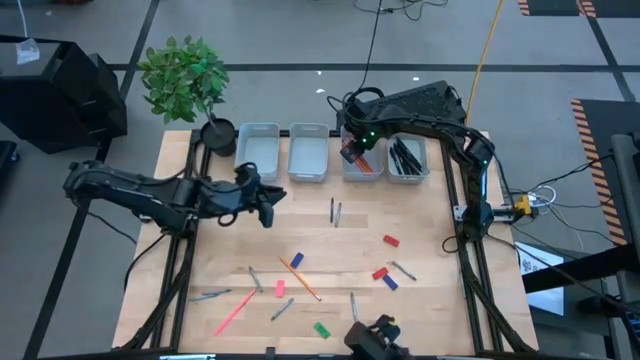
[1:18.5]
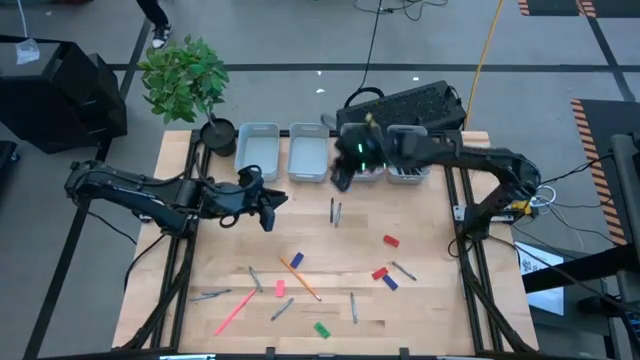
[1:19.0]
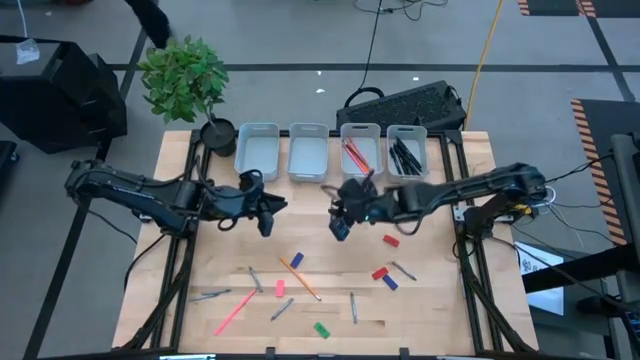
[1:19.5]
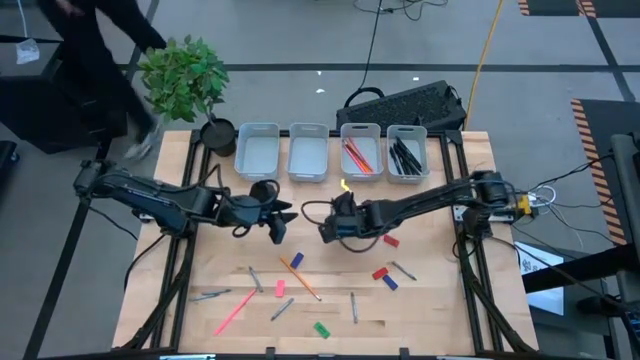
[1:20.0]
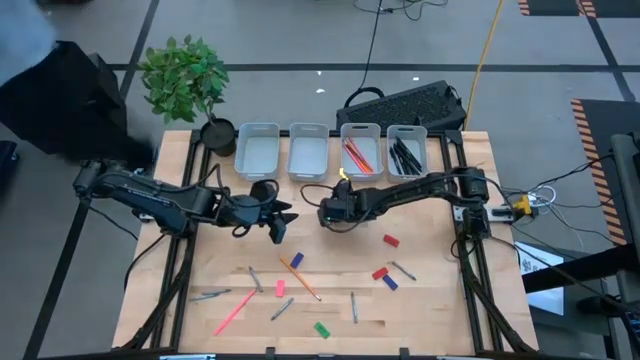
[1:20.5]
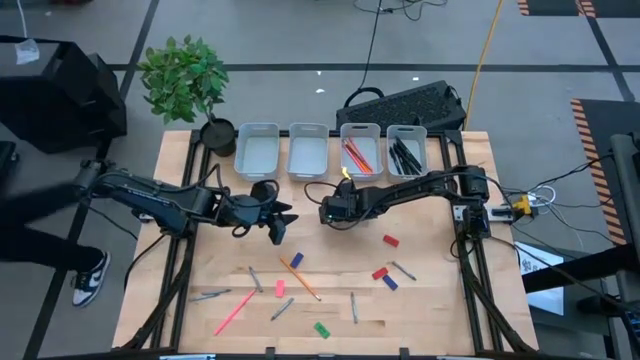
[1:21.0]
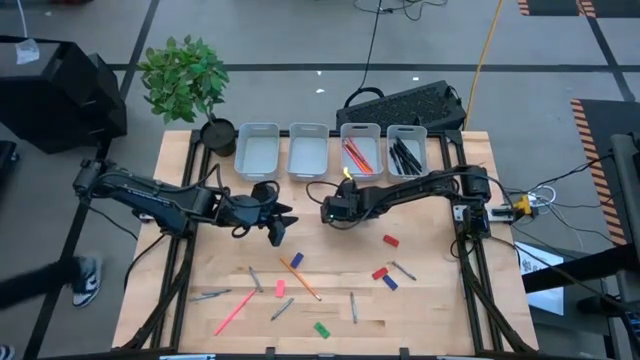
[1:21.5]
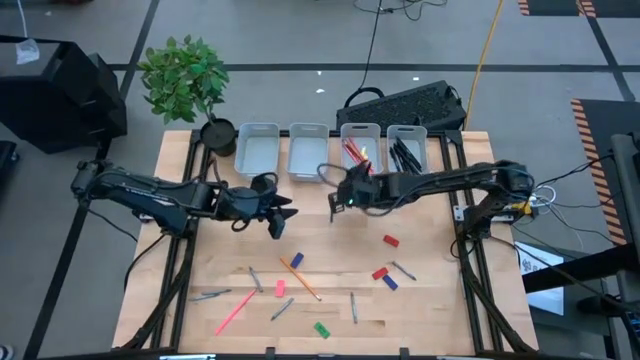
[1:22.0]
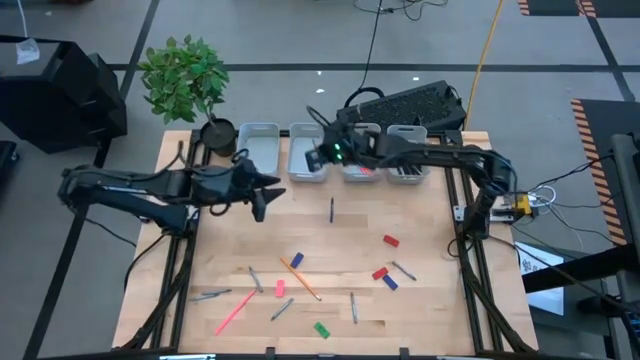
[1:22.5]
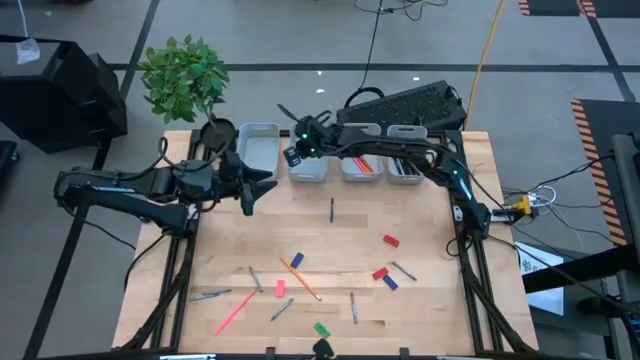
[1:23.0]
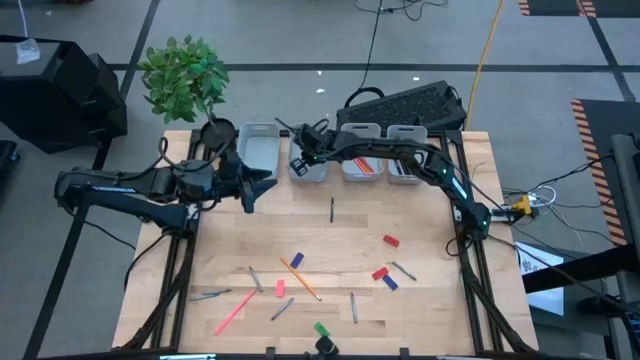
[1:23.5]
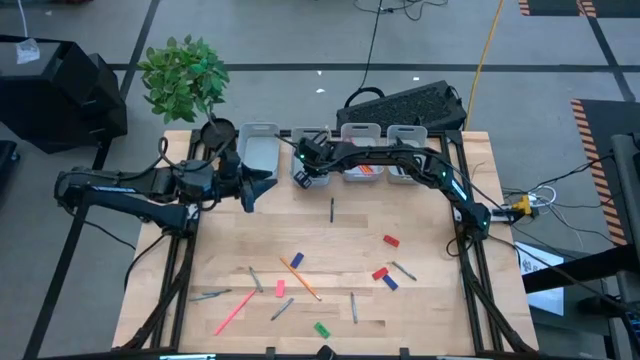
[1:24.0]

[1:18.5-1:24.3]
Task: Sort crayons/erasers/pens/pencils in bins
Put the gray crayon into the middle left gray bin

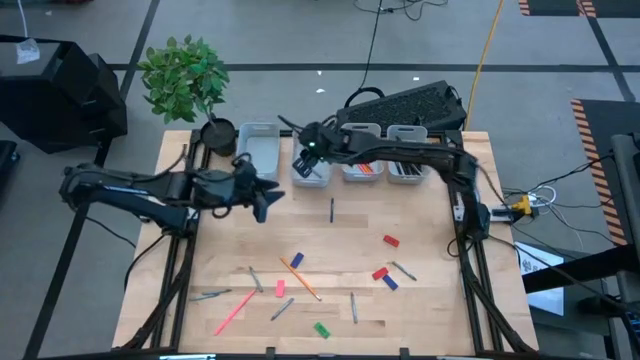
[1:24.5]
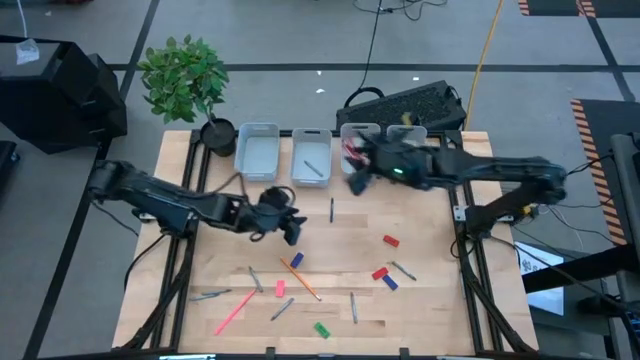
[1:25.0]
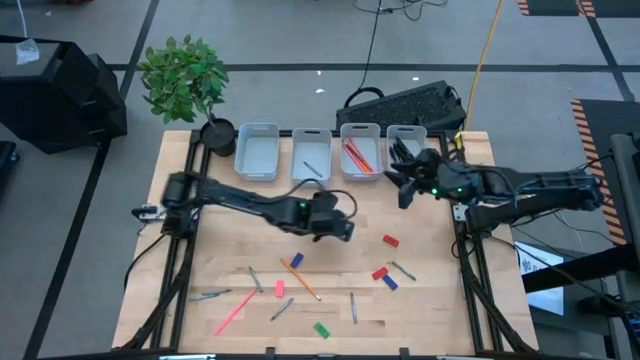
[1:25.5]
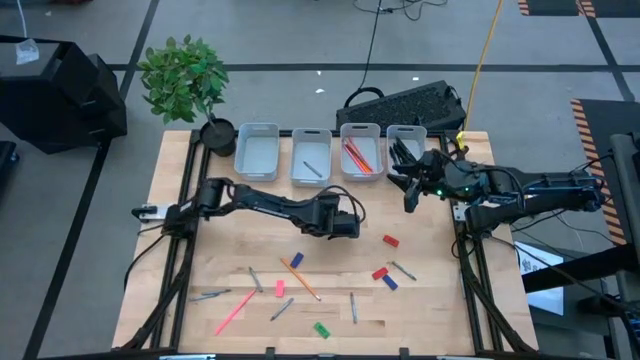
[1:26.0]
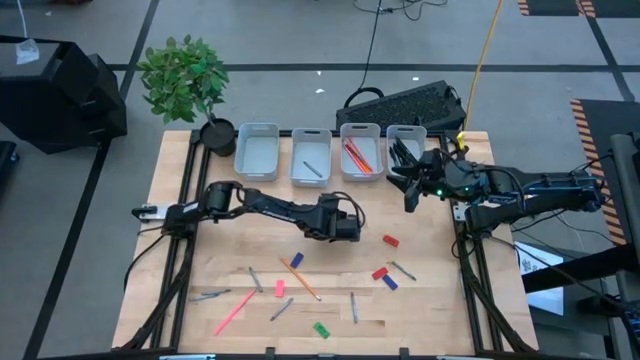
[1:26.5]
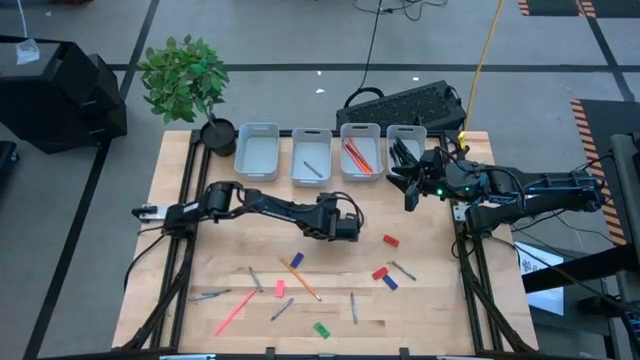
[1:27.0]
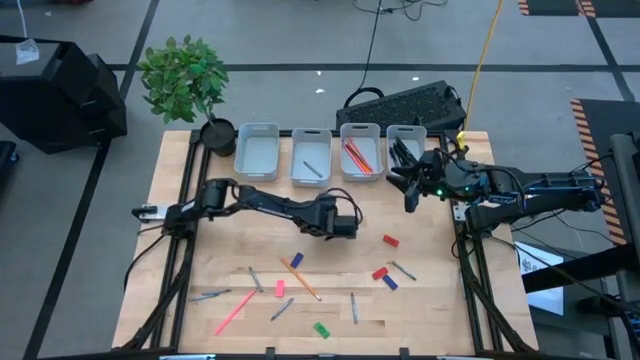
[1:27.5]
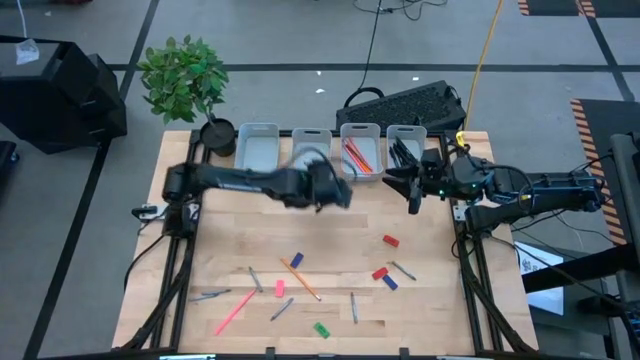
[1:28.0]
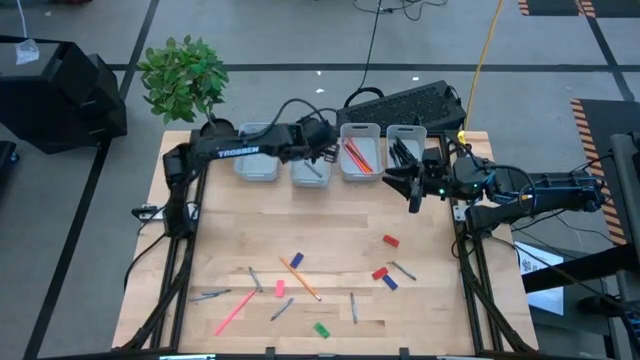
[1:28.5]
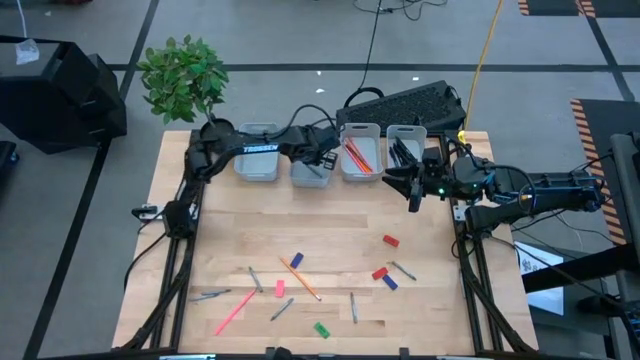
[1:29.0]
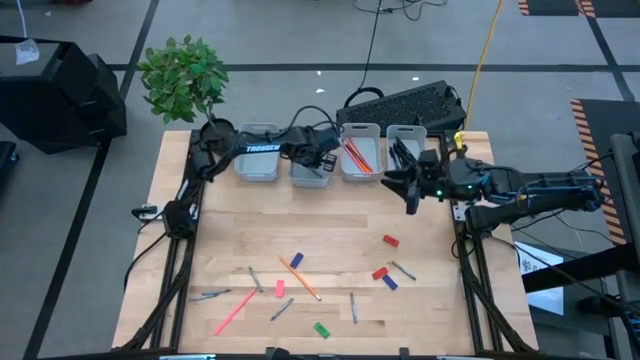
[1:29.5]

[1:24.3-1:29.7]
Put the blue crayon into the middle left gray bin

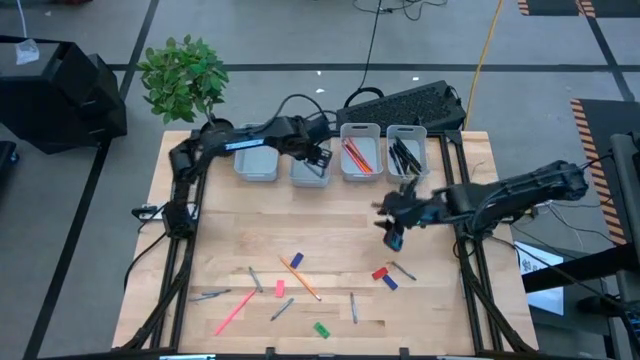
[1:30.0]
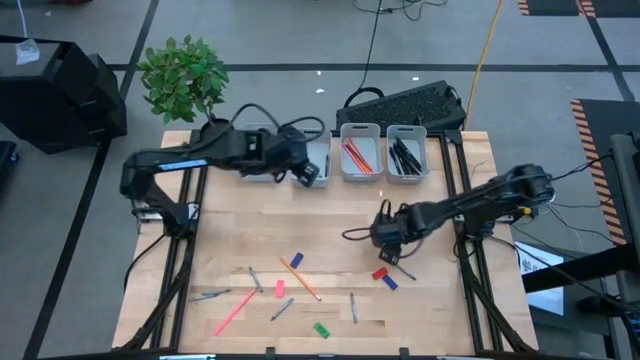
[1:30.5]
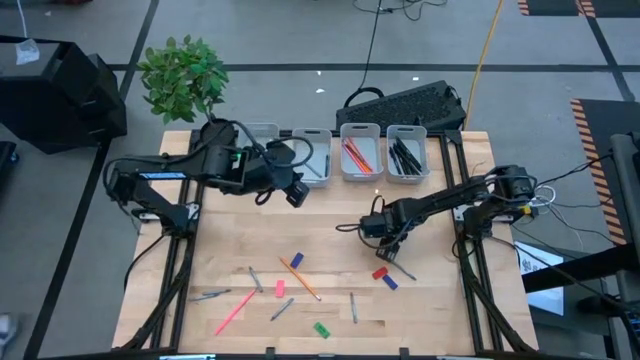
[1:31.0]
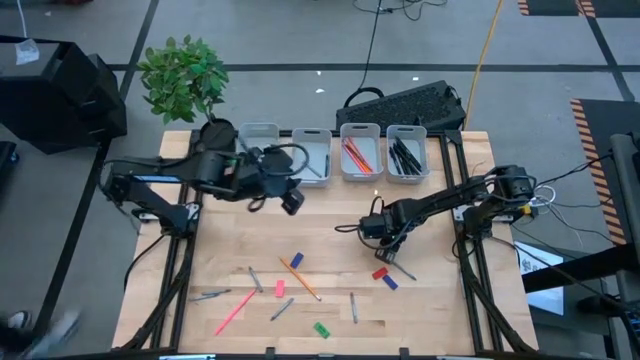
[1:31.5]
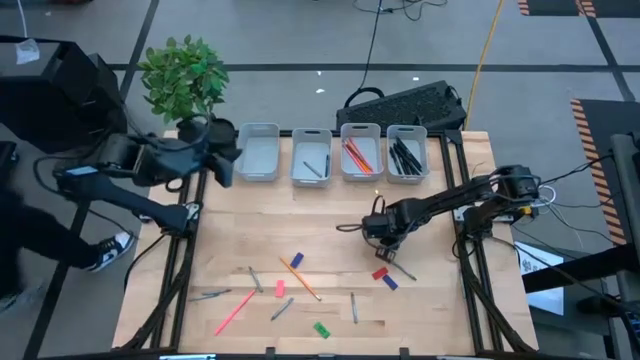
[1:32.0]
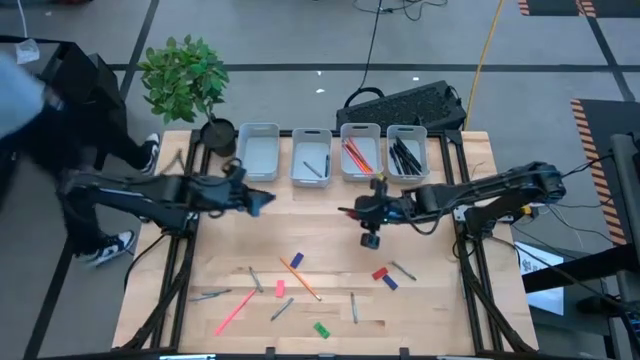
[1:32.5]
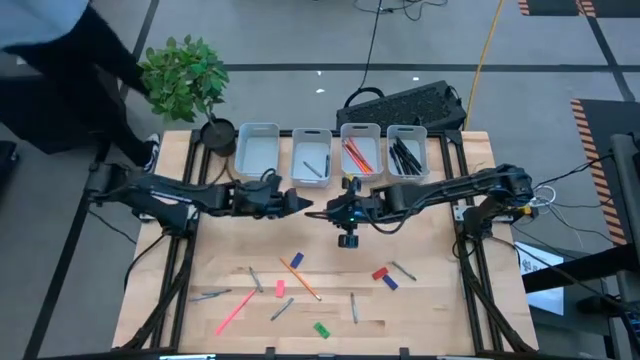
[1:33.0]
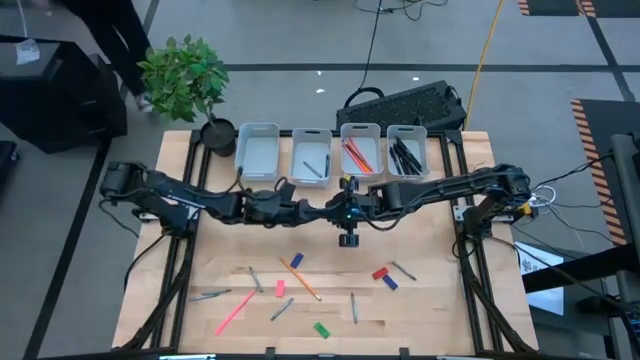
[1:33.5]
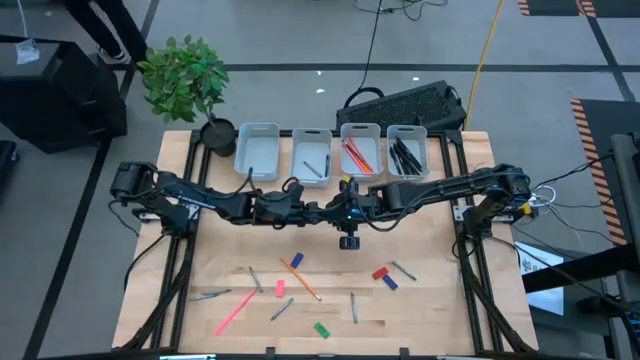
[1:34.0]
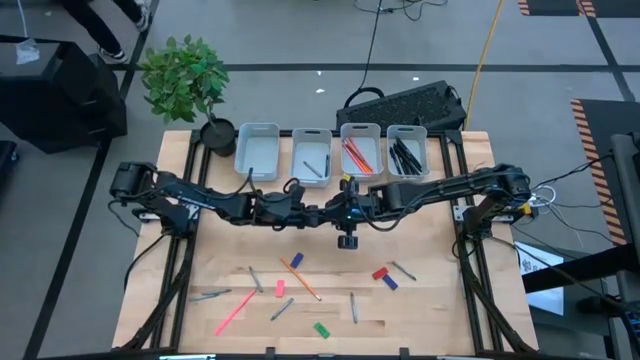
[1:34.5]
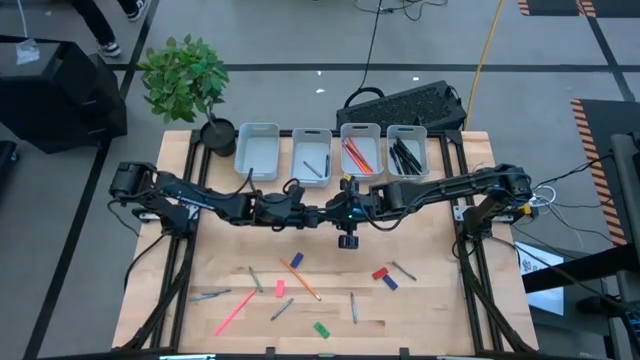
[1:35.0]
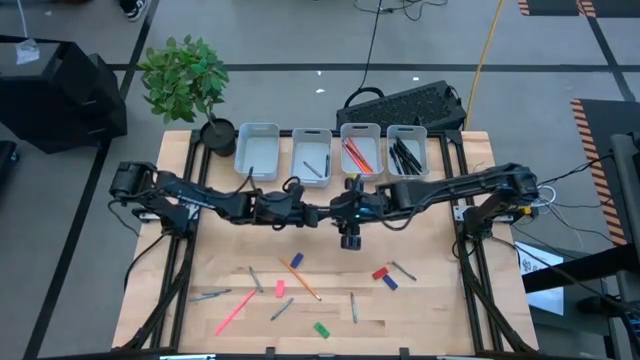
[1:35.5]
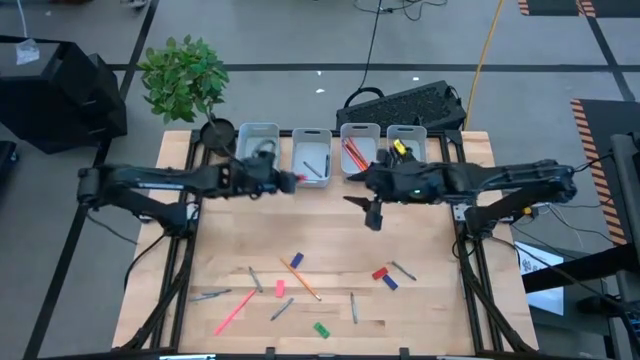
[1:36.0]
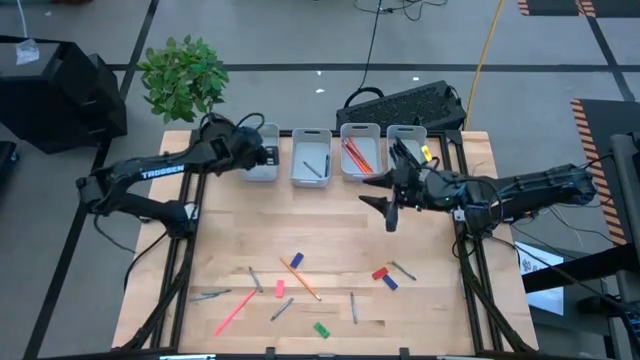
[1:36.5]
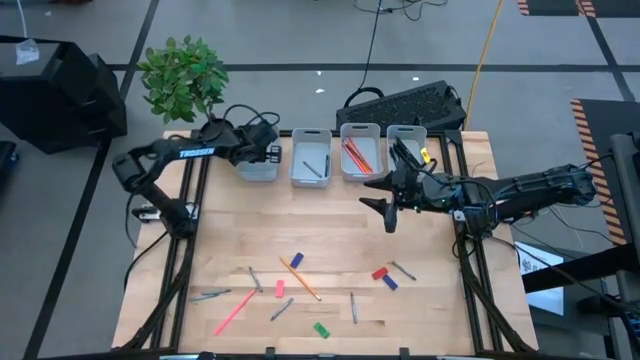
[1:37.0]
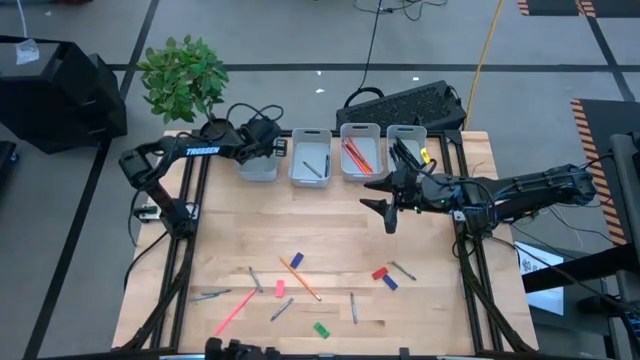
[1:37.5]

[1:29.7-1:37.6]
Put the red eraser into the top left gray bin

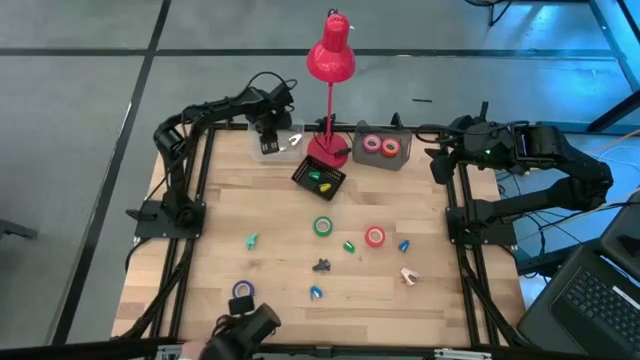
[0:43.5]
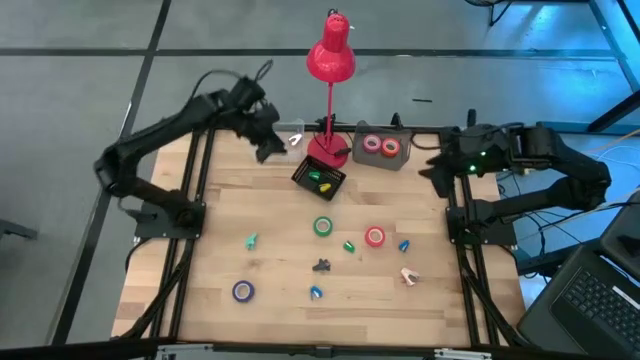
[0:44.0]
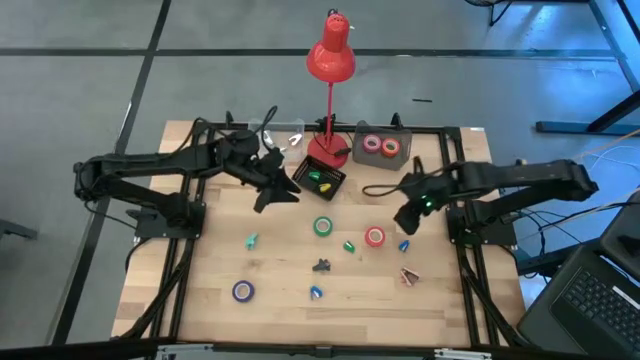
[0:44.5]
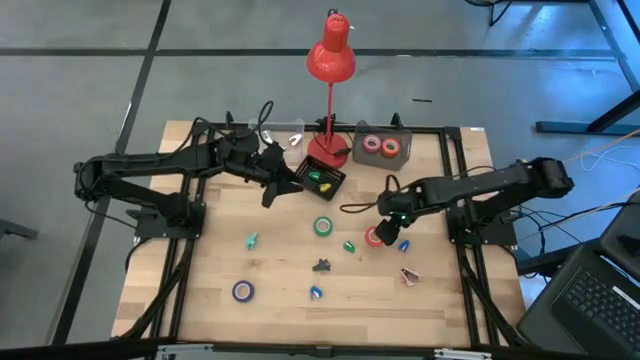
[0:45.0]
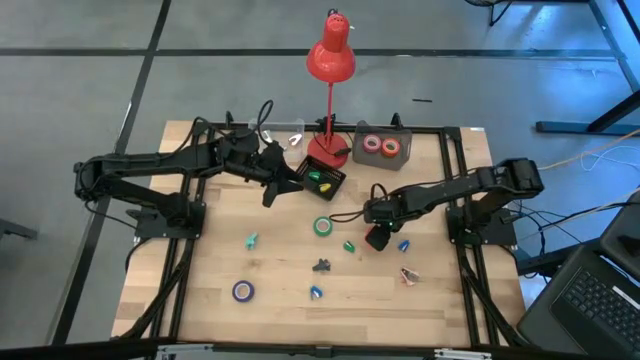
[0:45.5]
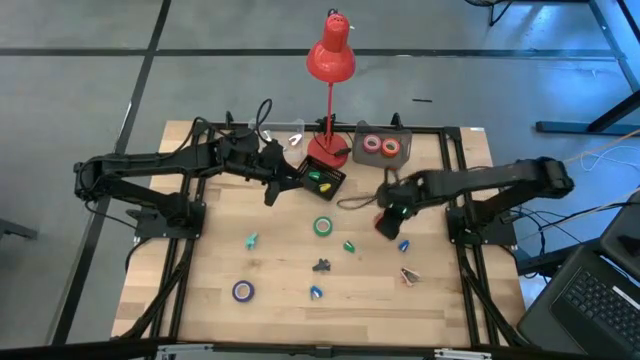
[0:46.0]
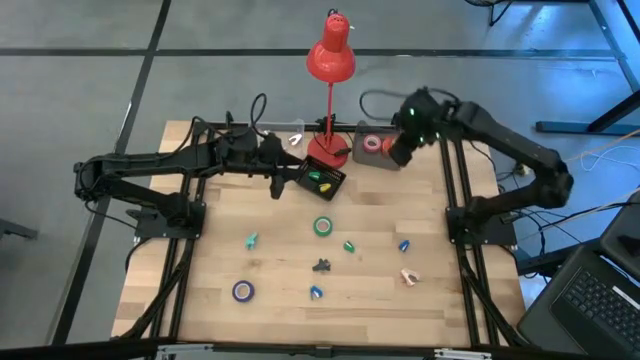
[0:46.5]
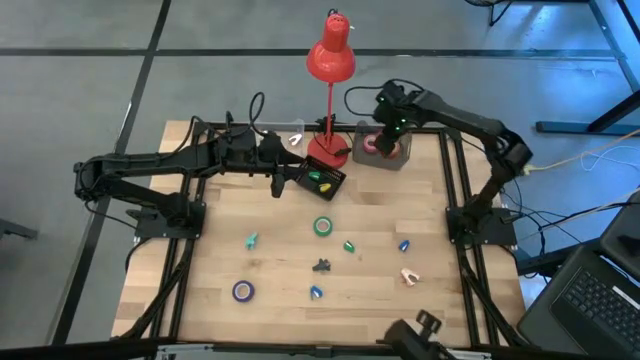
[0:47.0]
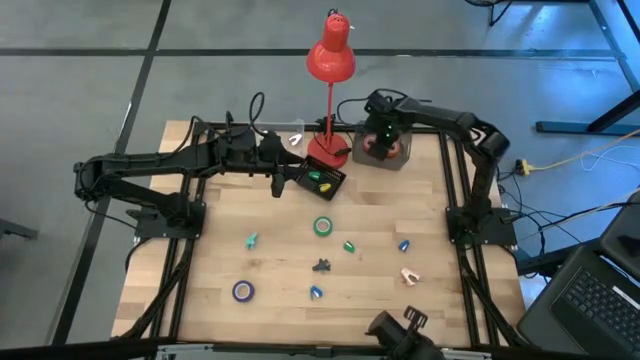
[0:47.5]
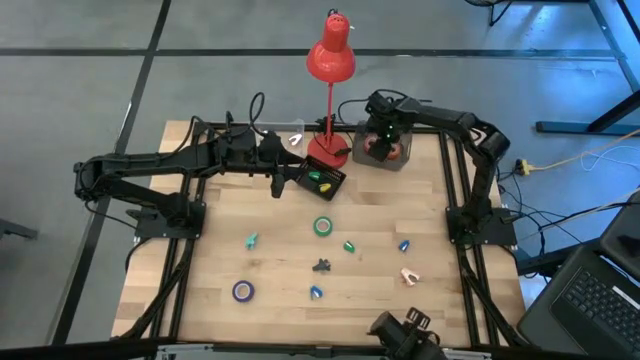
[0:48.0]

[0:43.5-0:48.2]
Task: Pick and place Stapler, Stapler remover, tape
Put the red tape into the gray bin
